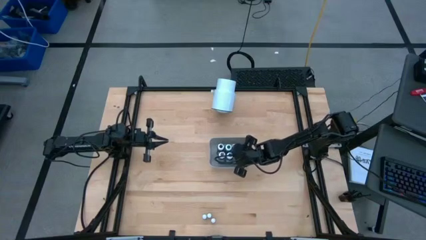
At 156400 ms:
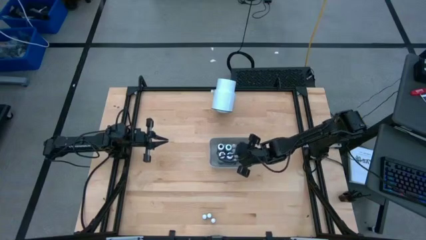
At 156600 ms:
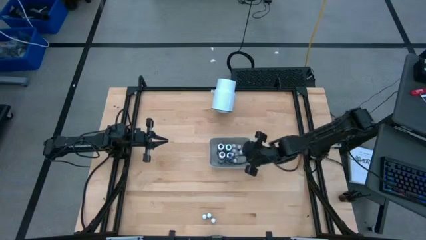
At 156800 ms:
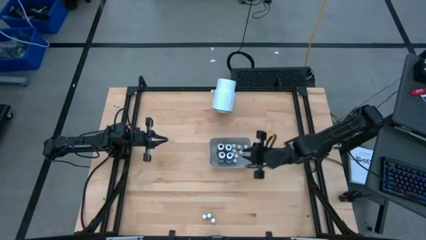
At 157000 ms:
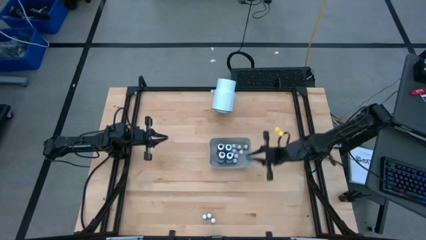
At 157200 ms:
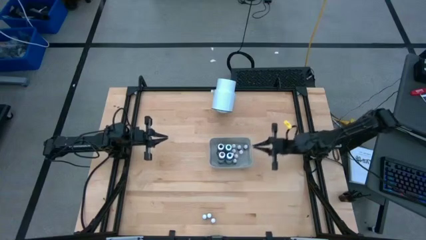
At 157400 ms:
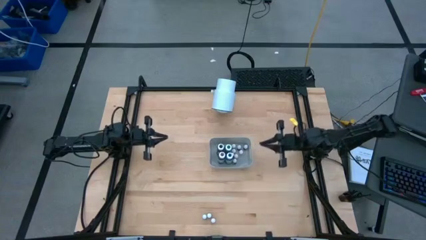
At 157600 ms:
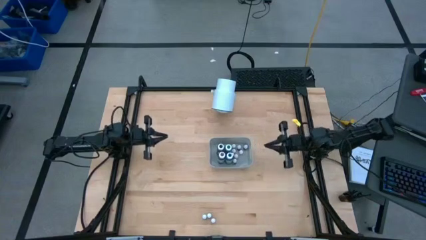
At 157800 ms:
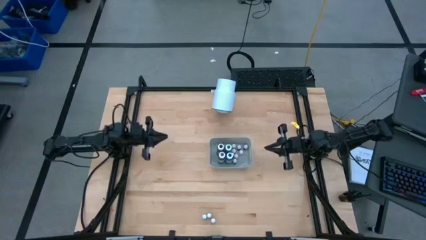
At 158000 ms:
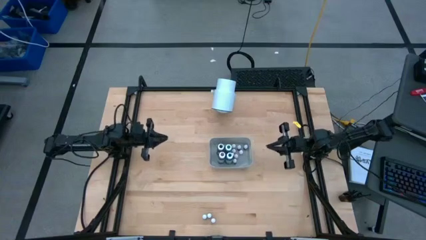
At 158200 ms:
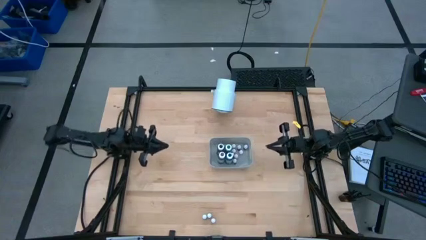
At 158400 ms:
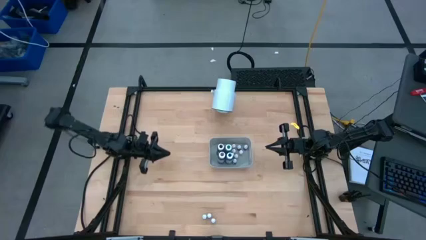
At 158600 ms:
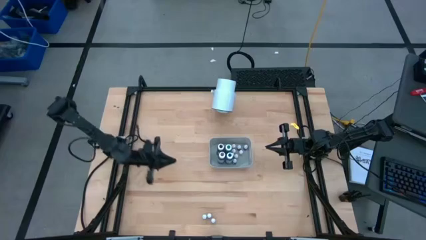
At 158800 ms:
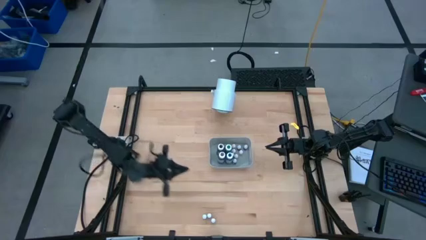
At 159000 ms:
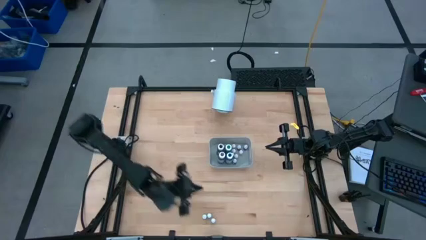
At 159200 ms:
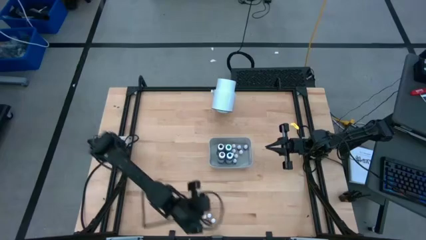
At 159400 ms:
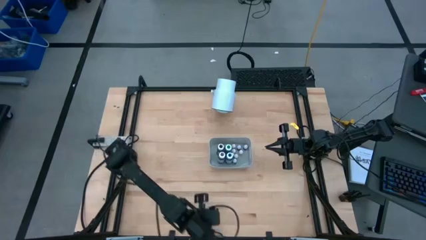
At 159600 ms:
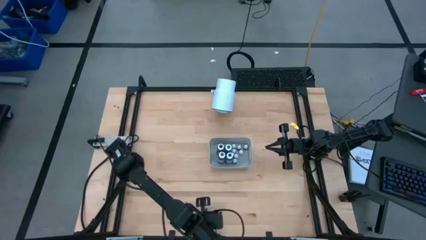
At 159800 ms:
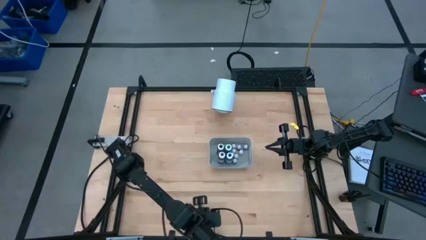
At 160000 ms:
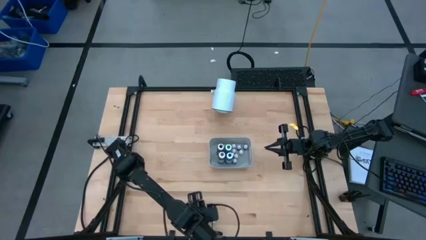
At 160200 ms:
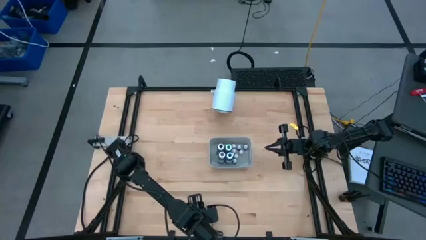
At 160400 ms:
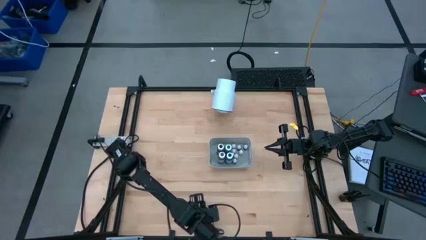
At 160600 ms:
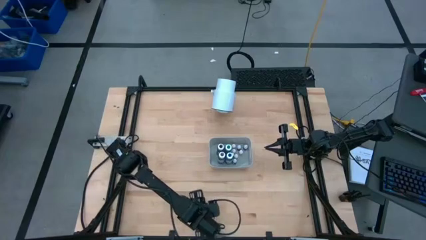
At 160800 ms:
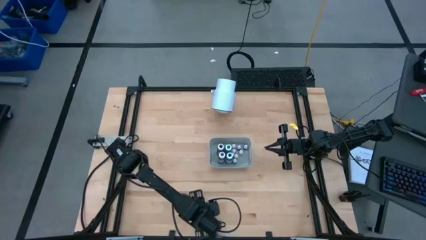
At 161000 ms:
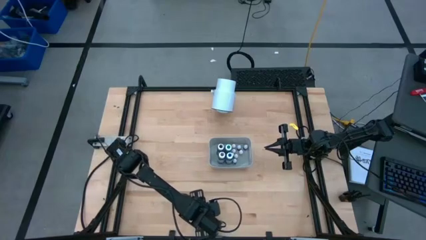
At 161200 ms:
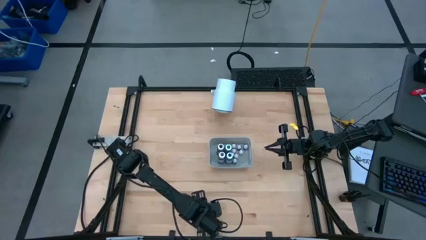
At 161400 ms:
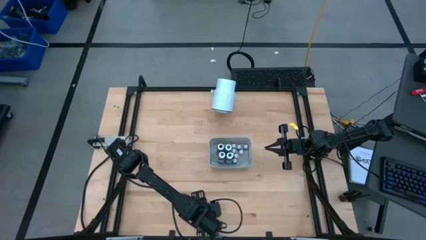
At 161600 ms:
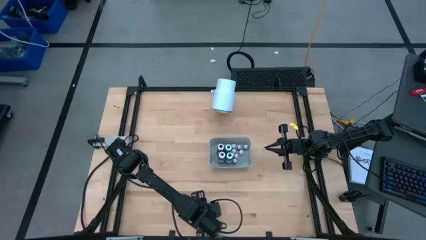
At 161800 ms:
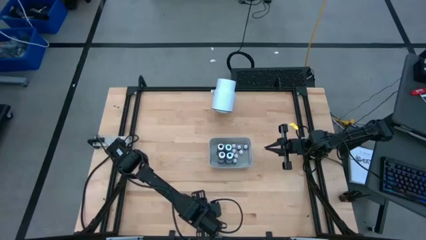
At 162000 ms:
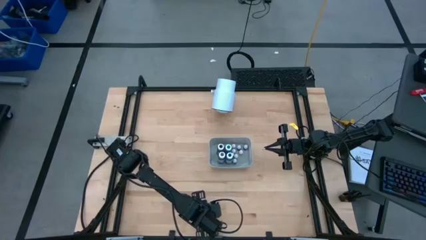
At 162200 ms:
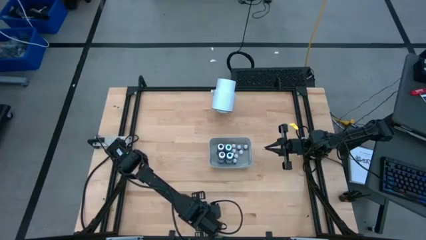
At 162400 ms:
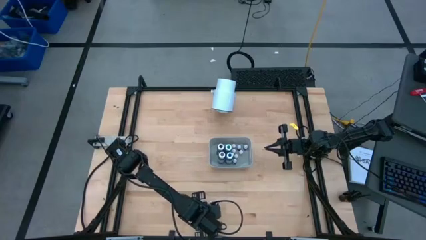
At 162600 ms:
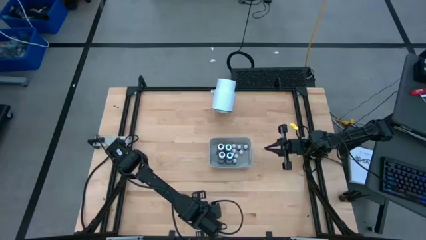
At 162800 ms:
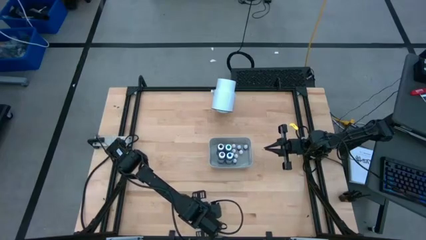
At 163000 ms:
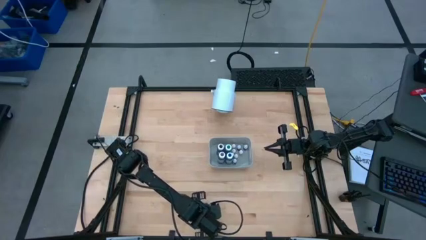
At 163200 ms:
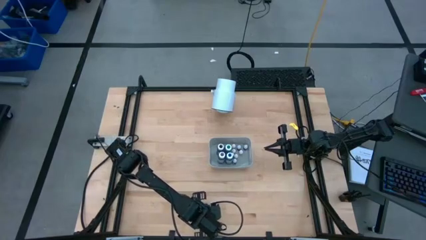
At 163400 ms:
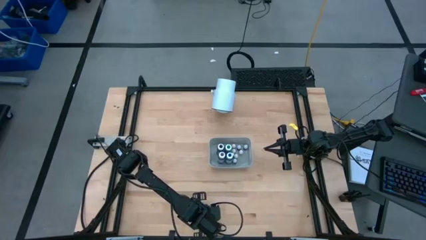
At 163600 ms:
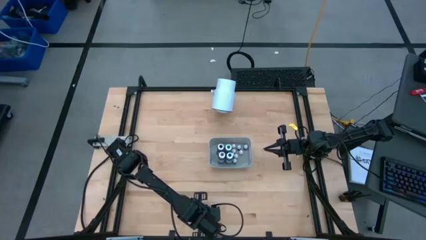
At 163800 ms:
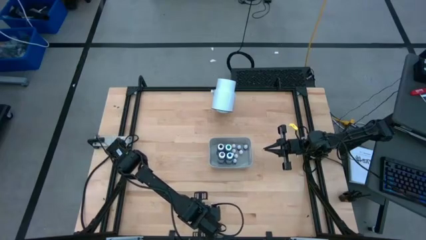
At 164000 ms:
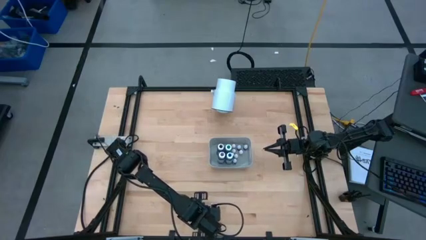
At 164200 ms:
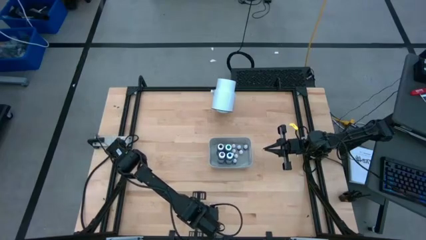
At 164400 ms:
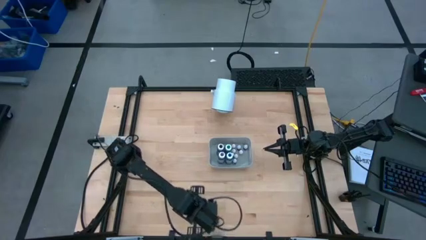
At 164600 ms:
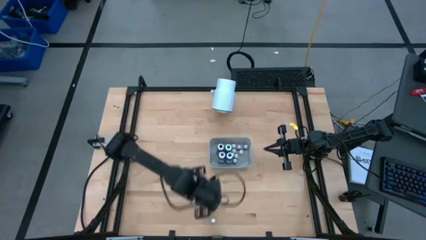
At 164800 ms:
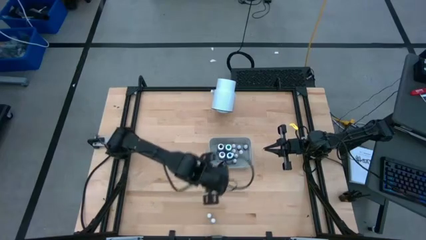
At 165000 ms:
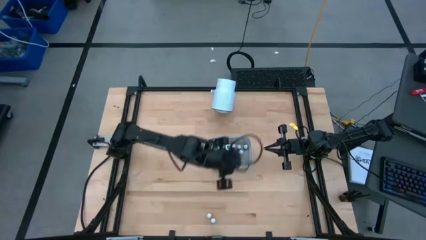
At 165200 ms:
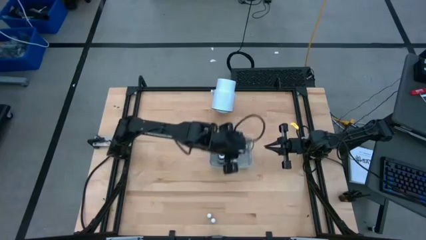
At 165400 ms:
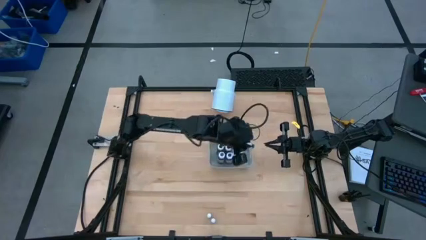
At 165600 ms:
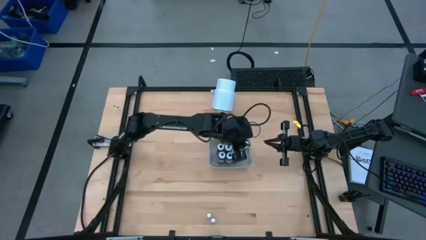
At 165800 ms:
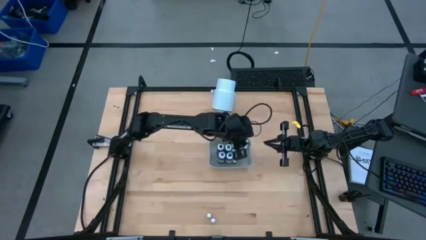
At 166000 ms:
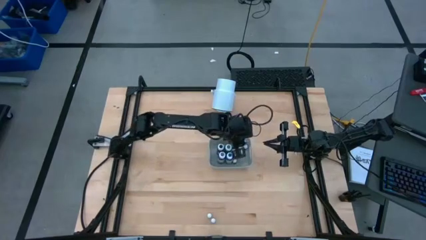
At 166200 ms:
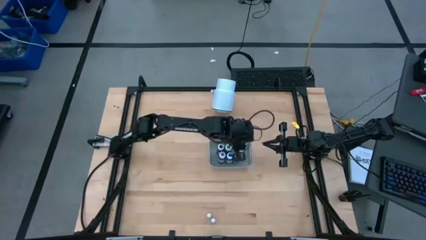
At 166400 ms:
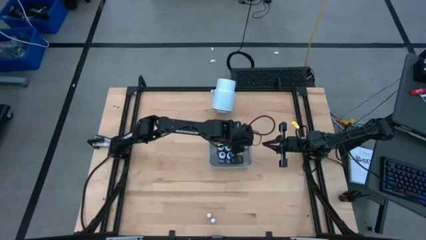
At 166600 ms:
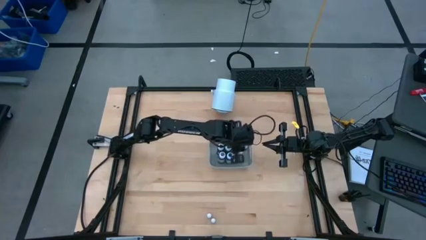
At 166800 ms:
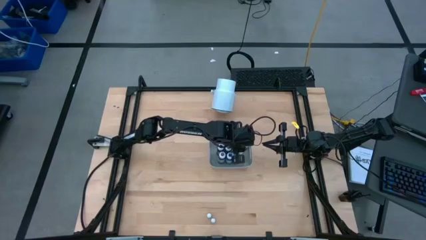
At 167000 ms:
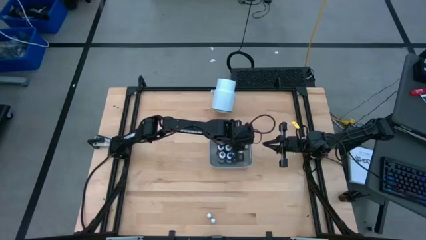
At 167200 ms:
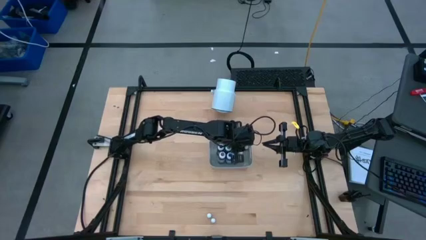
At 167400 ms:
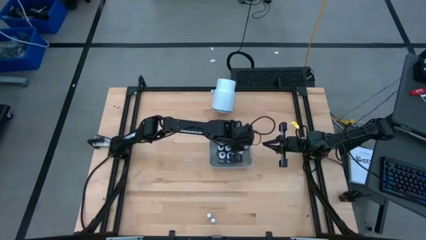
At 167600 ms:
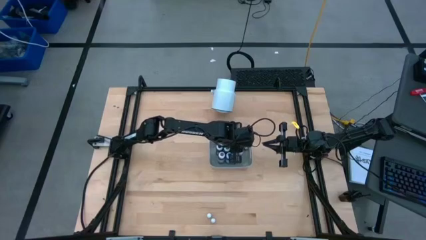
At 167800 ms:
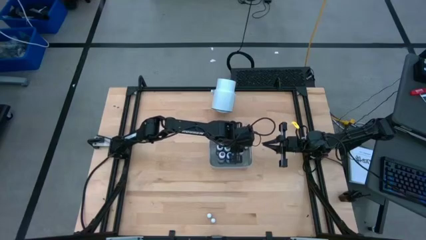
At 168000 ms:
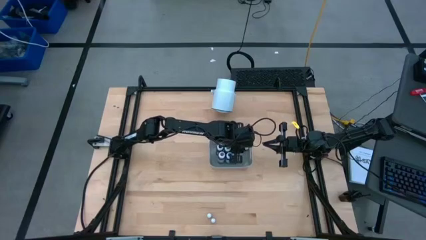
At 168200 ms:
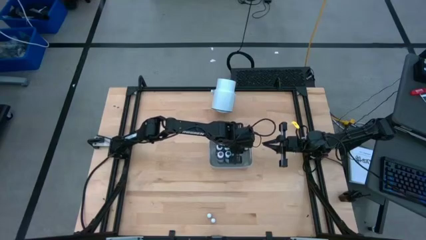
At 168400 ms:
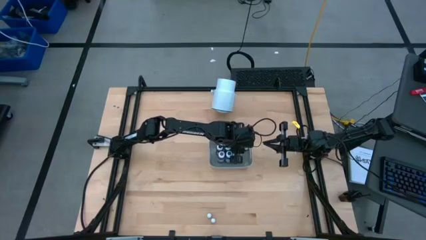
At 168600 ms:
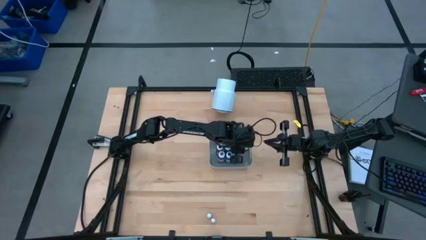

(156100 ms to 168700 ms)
Task: Pick & Place food coloring
Put the small black food coloring bottle into the gray bin

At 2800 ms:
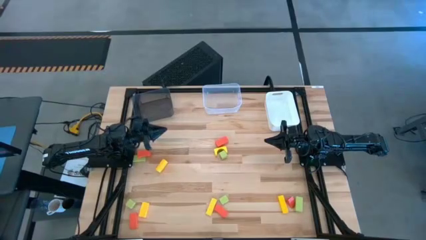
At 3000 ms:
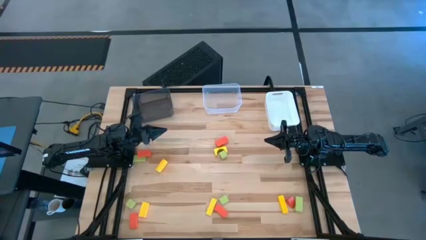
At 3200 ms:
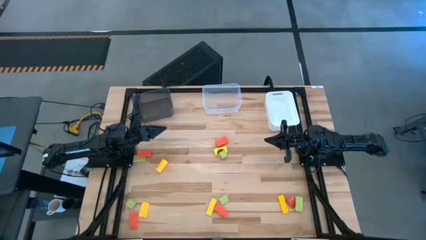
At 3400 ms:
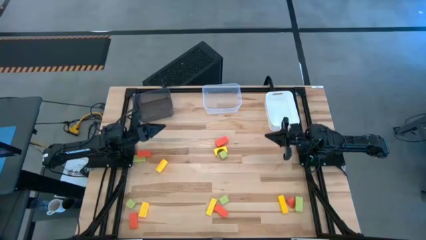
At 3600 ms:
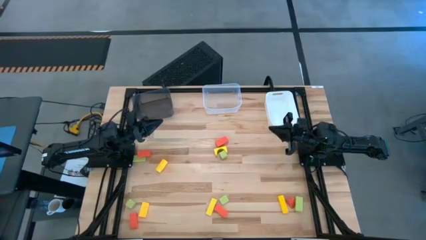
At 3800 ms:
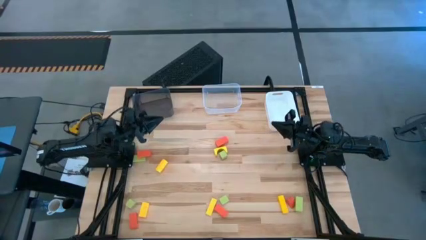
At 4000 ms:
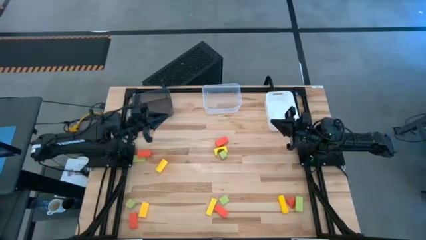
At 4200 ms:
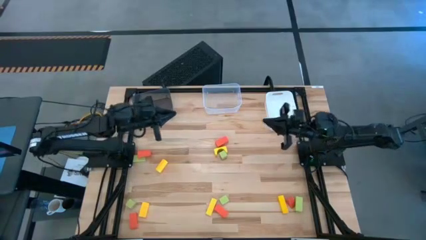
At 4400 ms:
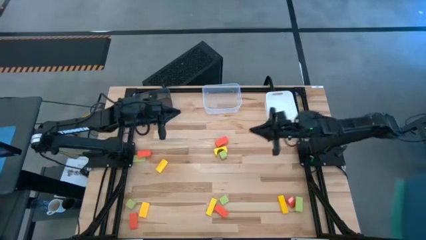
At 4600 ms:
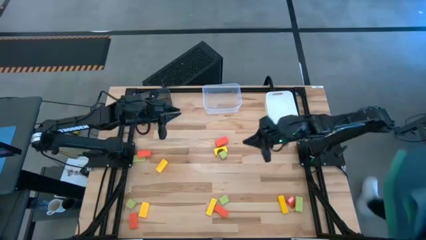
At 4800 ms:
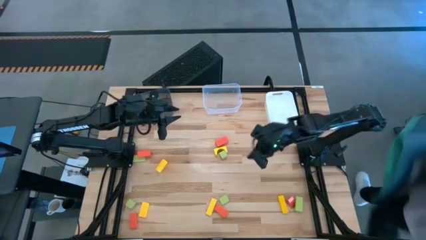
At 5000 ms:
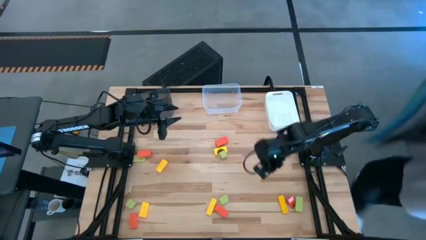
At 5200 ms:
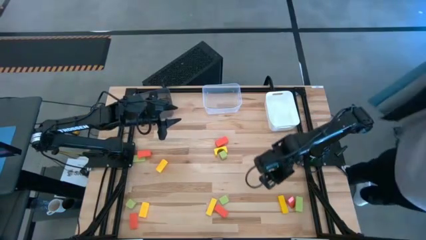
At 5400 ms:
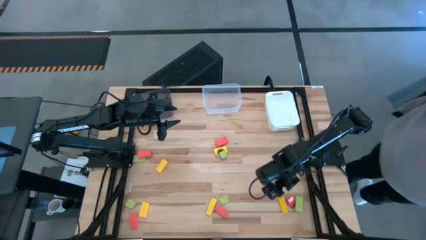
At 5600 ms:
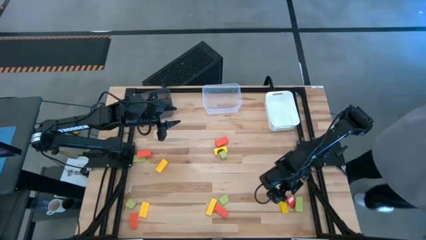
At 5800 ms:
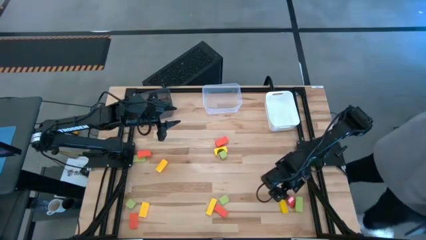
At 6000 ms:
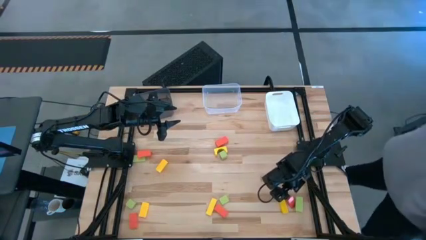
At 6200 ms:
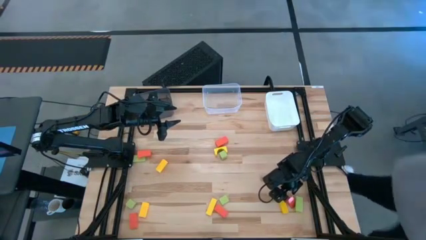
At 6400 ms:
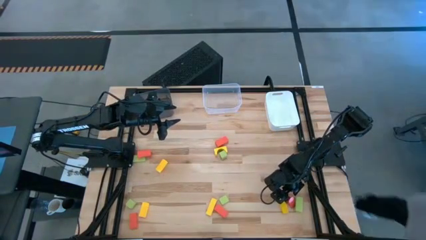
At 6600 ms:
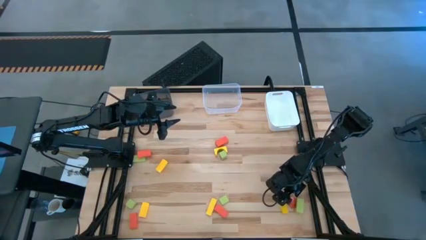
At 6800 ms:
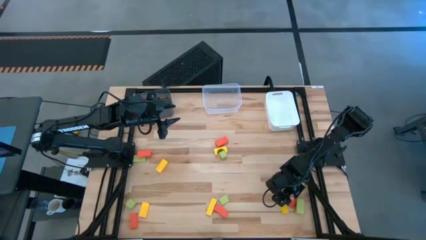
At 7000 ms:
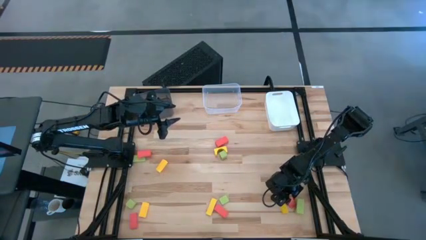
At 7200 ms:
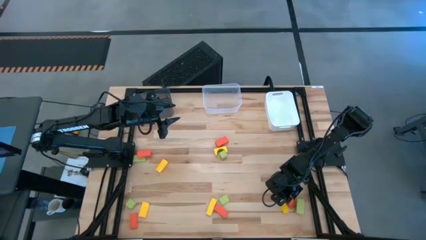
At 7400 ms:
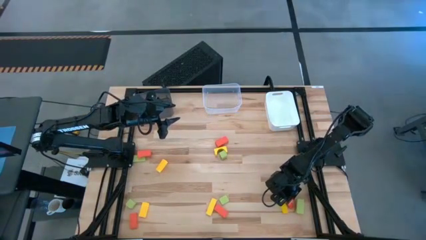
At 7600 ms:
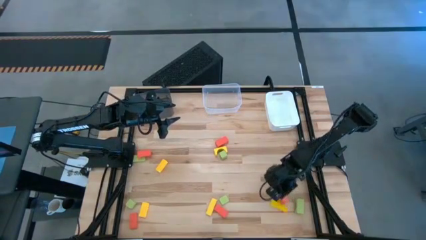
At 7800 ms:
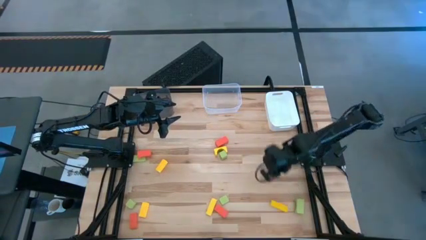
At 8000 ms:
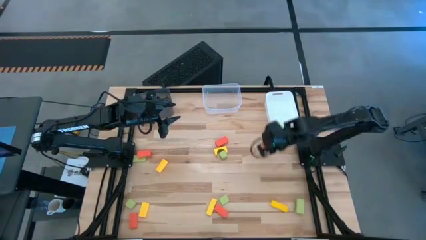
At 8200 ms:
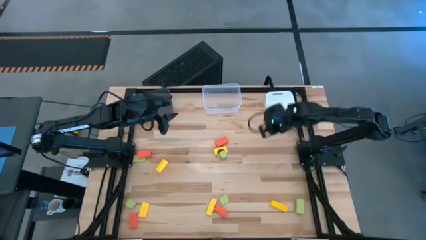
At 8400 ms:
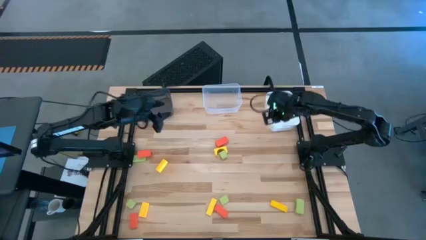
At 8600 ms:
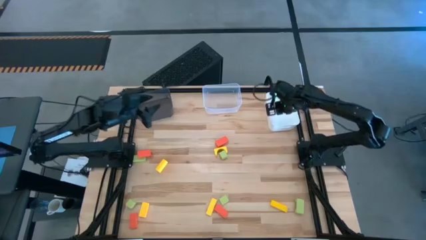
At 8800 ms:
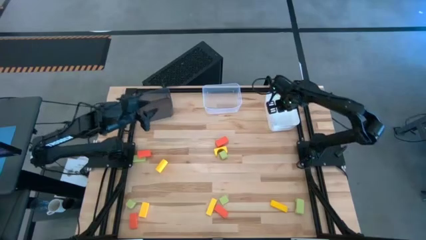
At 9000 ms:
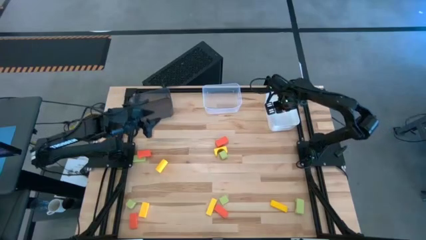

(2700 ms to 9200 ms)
Task: Sort & place blocks by color
Put the orange block into the white bin
